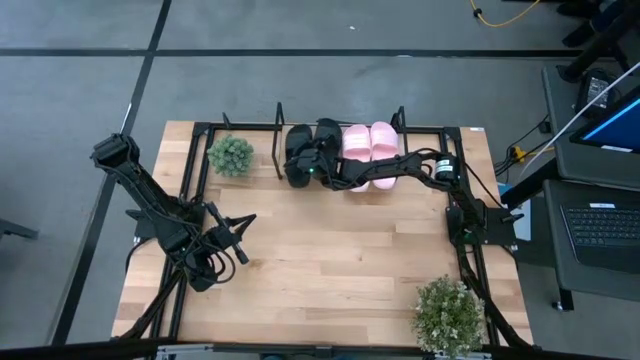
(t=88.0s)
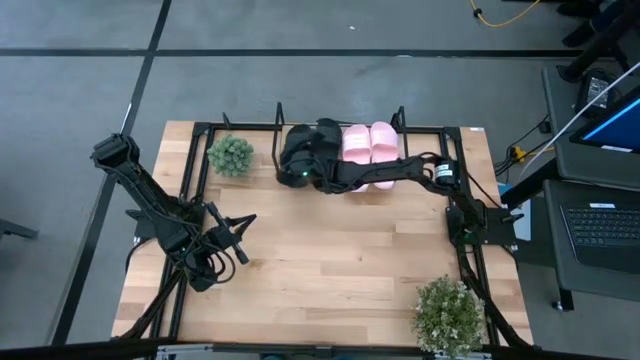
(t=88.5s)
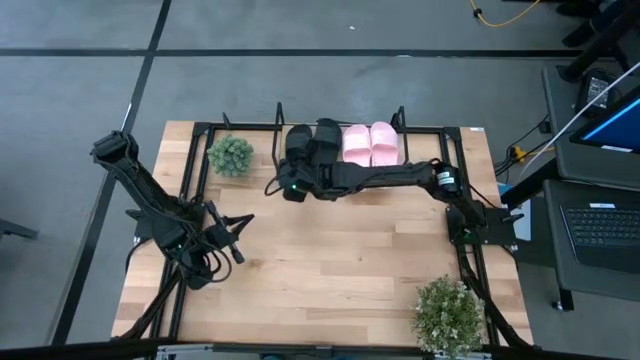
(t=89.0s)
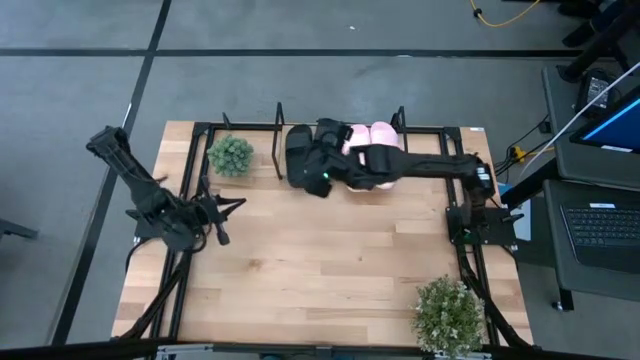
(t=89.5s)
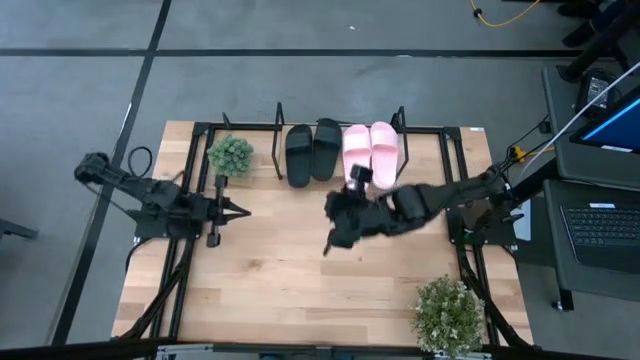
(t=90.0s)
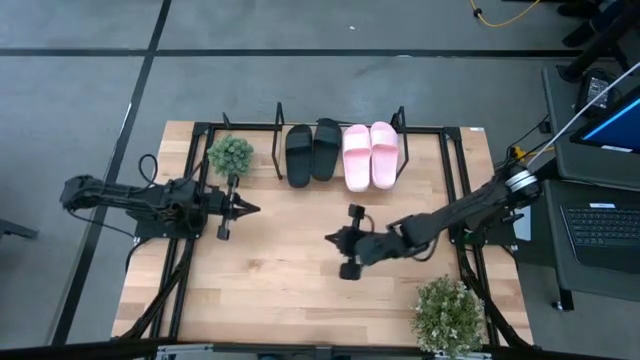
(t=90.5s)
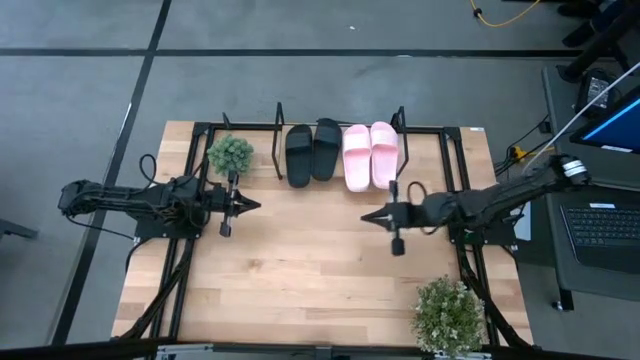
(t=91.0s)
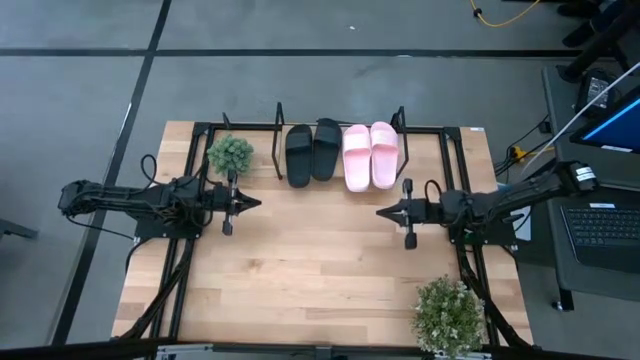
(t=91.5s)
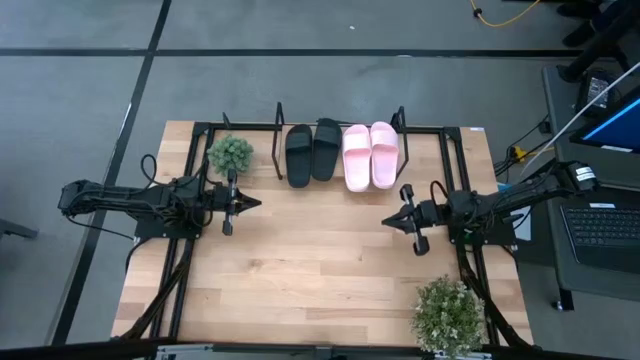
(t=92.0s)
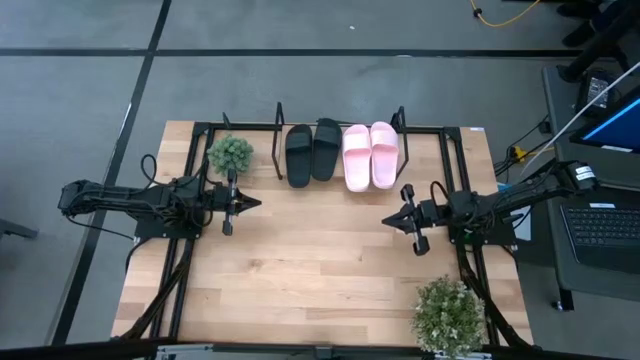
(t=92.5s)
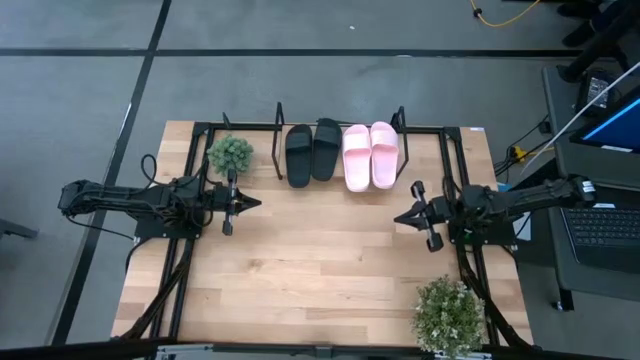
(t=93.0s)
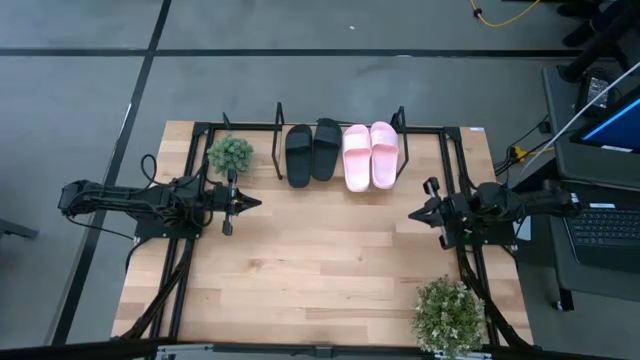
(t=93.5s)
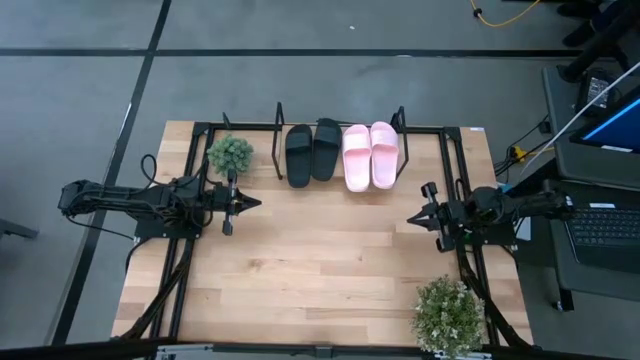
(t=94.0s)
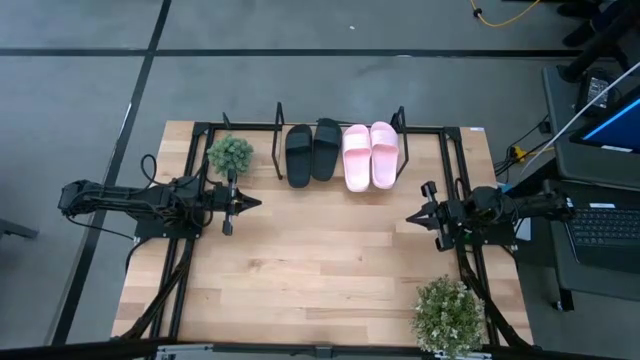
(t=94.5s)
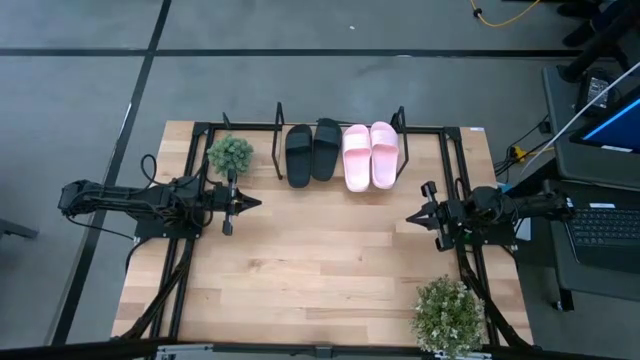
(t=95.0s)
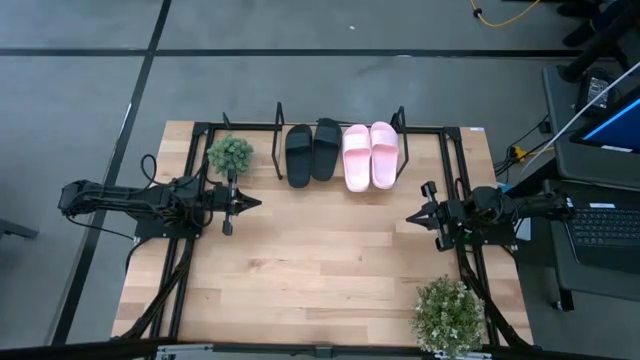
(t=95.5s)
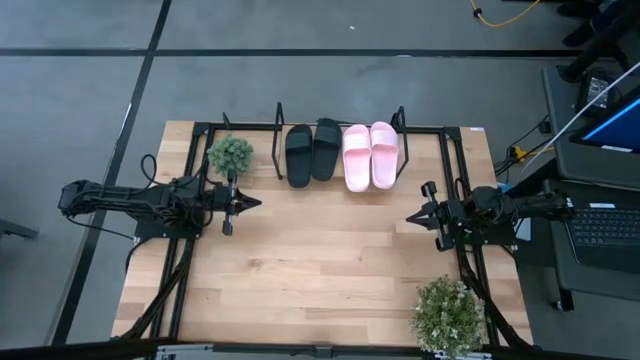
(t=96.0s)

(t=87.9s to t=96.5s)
Task: Pick and place slides into the shelf
Return to Home Position

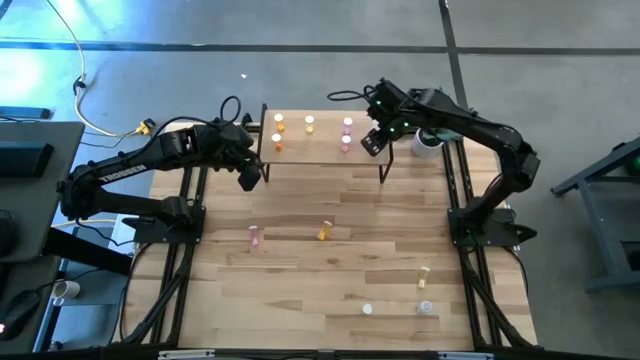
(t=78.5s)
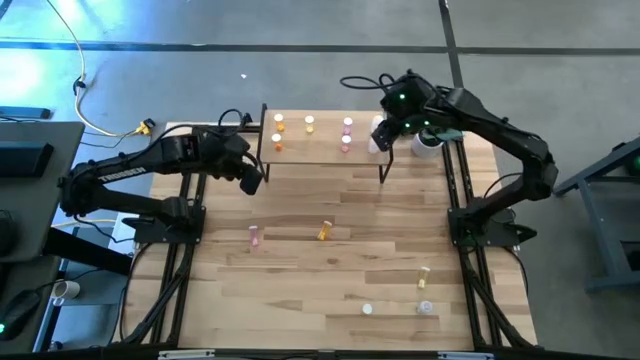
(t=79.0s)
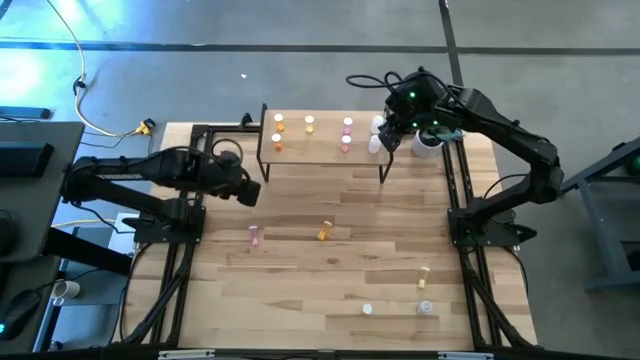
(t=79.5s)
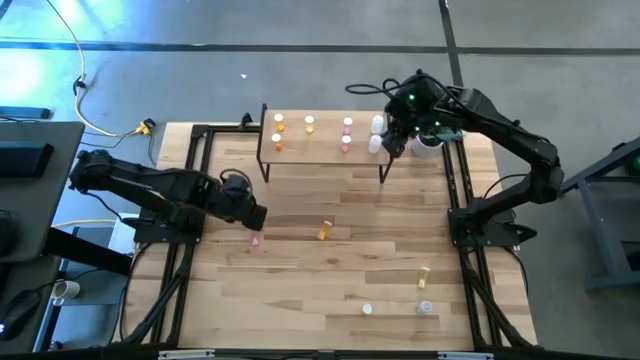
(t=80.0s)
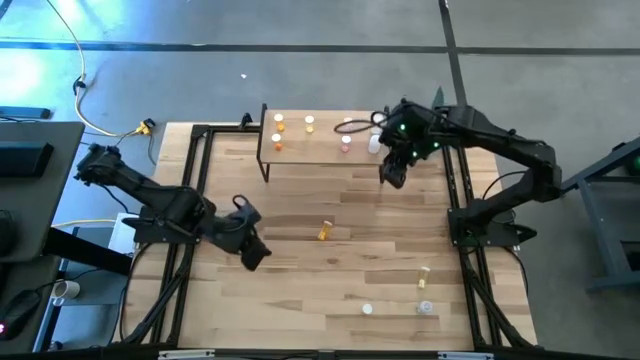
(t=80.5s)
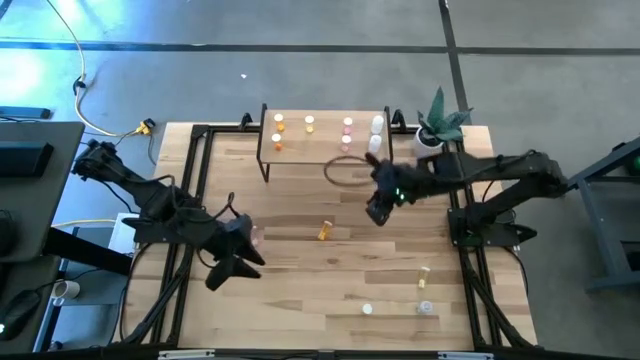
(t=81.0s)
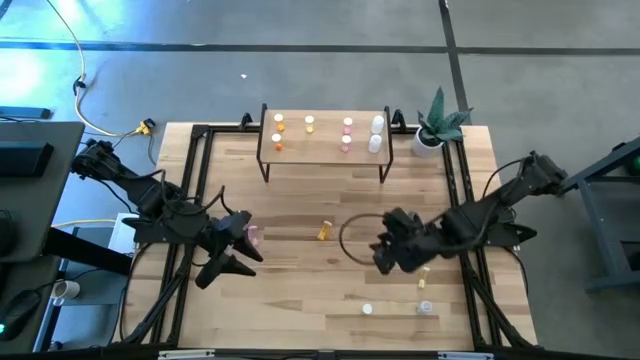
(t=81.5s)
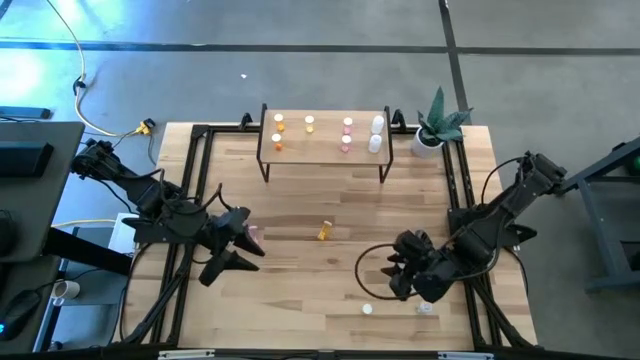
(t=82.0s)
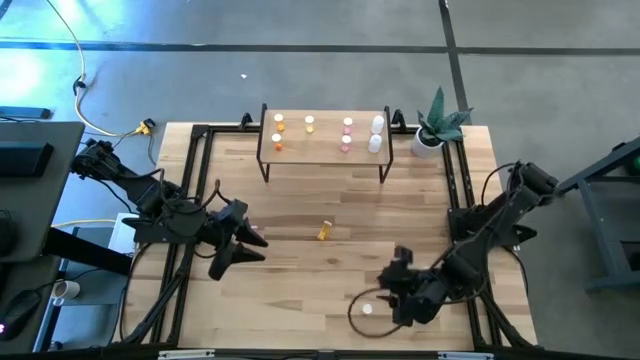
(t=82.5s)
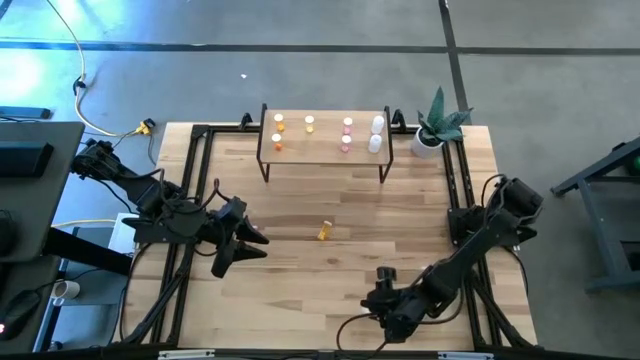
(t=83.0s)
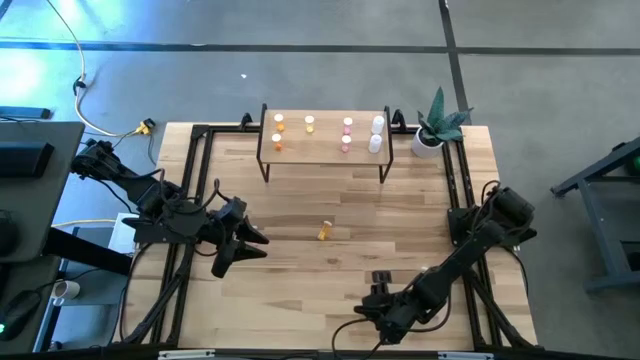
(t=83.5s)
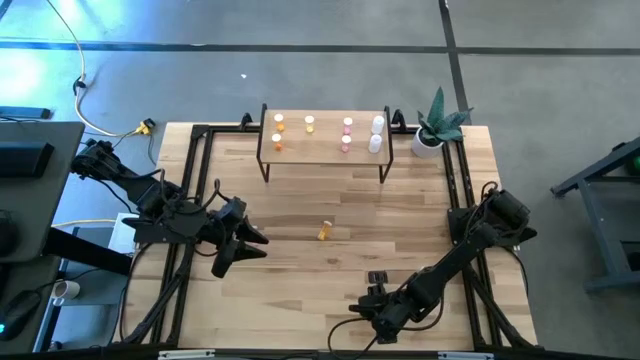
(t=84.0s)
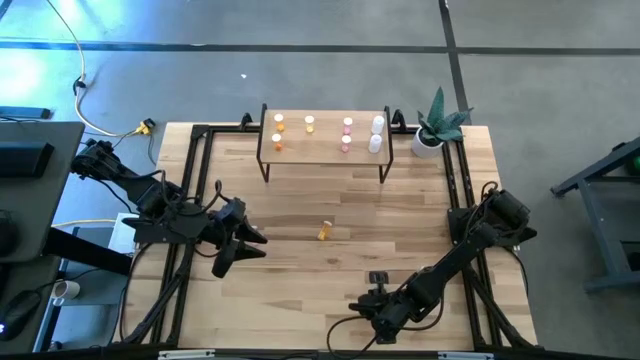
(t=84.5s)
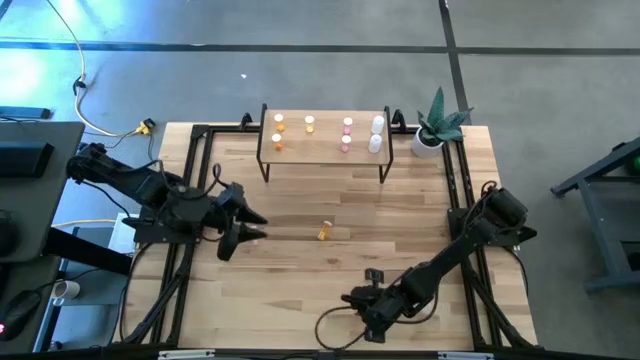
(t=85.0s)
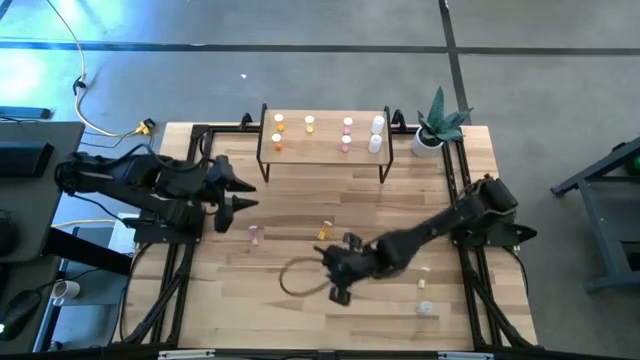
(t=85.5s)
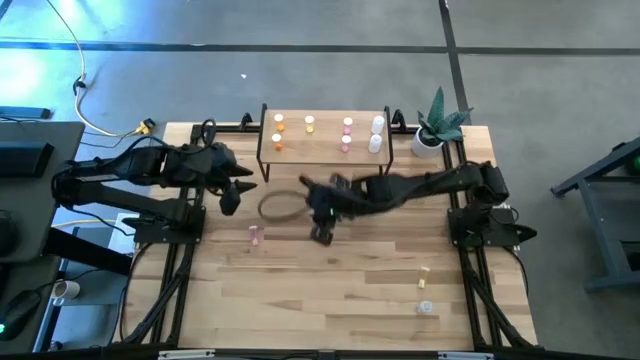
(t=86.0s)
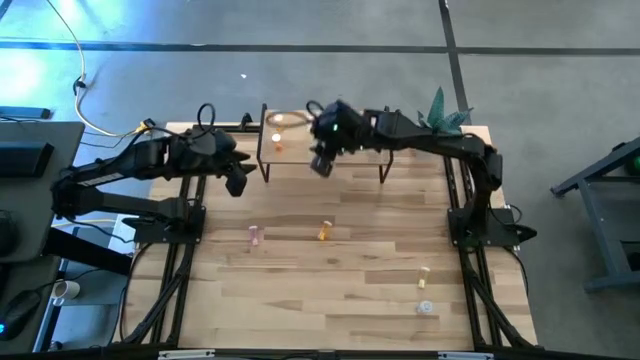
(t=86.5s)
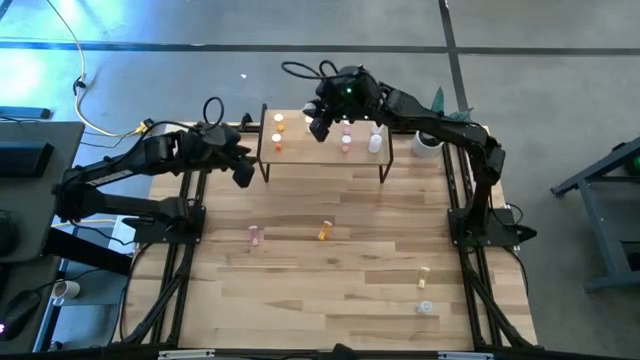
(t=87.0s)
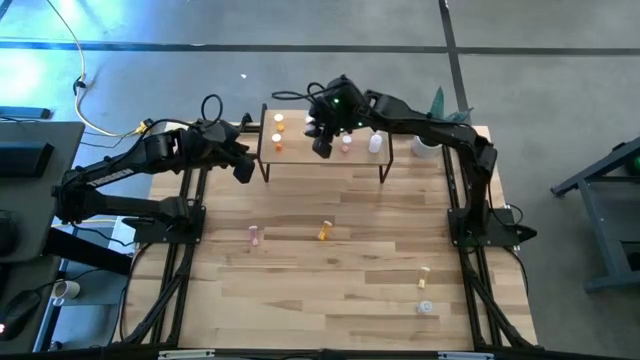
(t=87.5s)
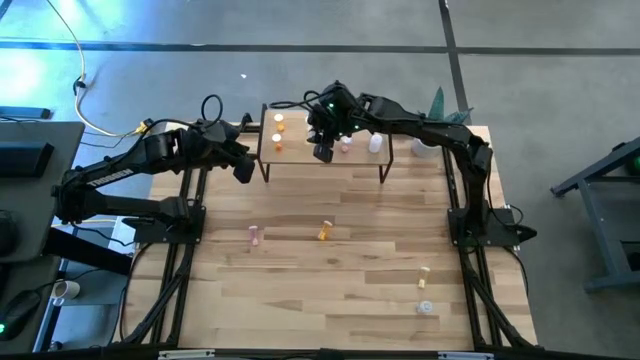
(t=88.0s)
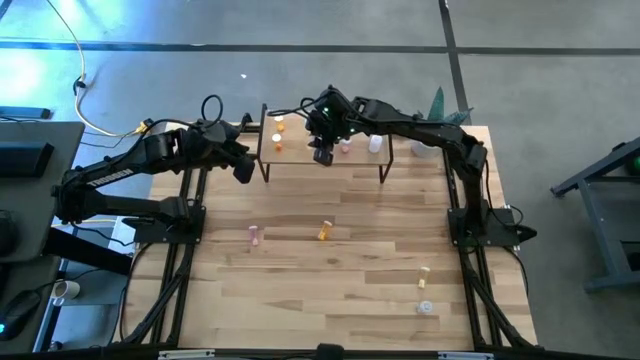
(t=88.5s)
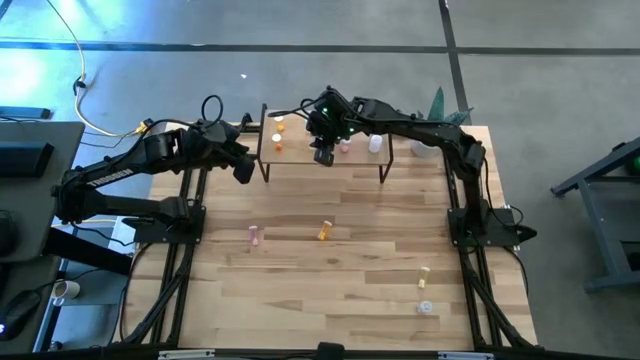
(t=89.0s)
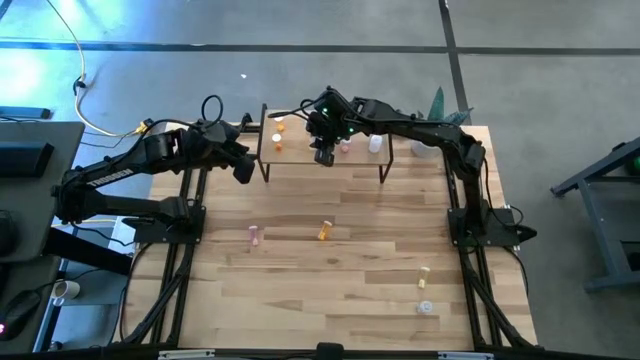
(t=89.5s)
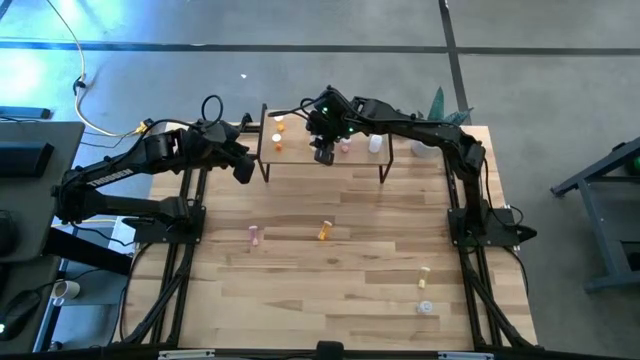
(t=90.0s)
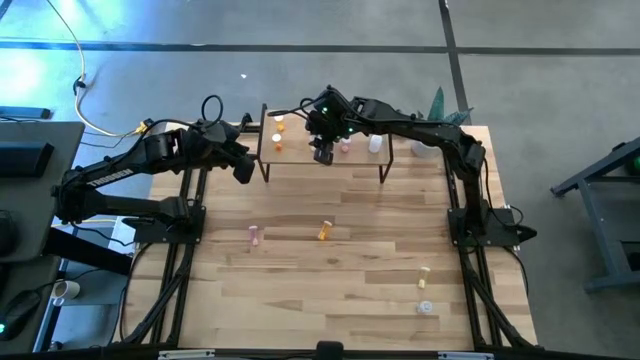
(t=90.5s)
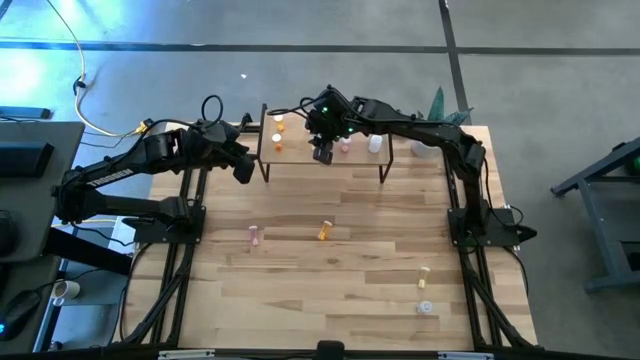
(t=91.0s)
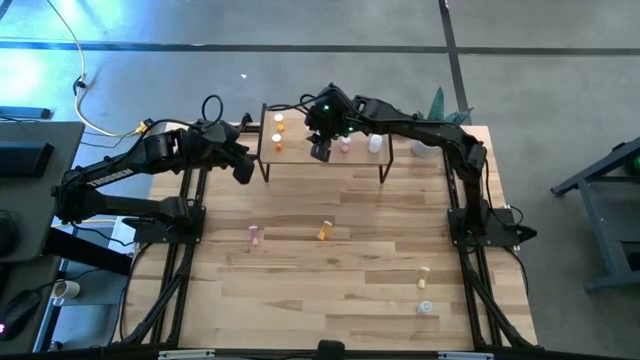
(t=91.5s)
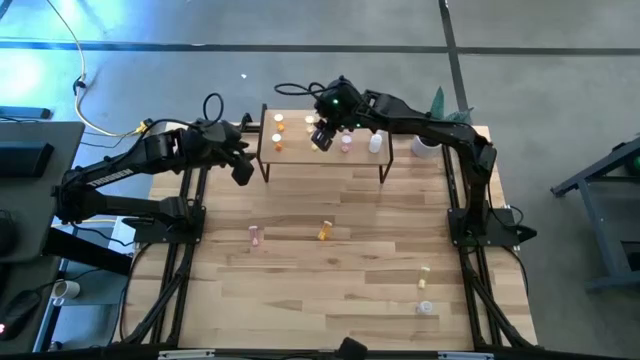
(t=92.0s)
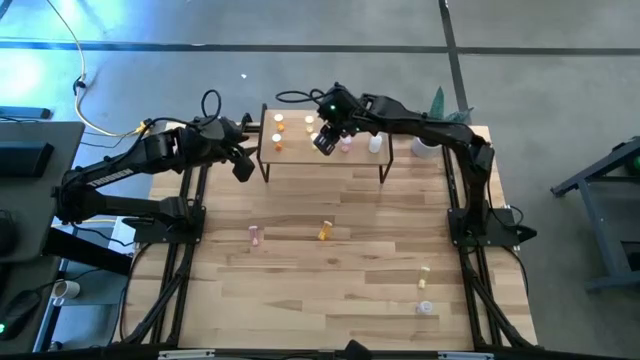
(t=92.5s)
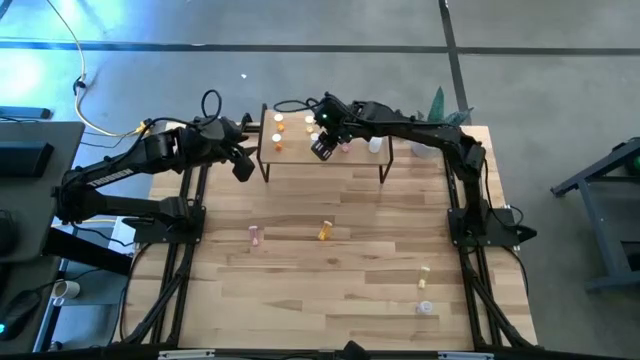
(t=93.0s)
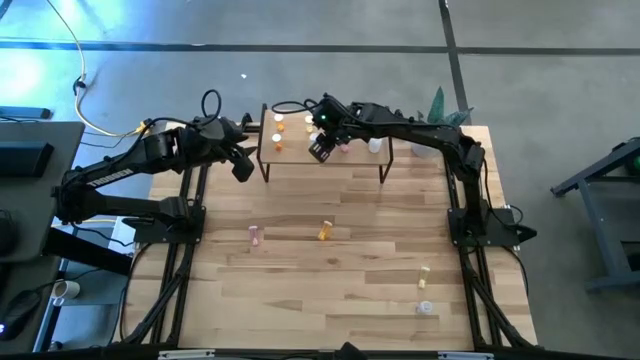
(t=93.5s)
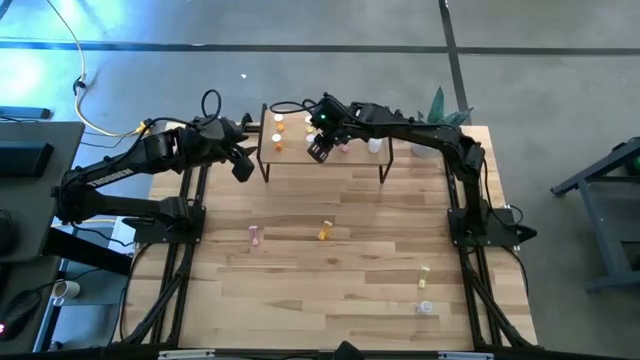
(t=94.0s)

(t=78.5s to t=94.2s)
Task: Pick and place medicine bottles onto shelf by color
Put the left yellow pill bottle on the shelf aligned with other yellow pill bottle
